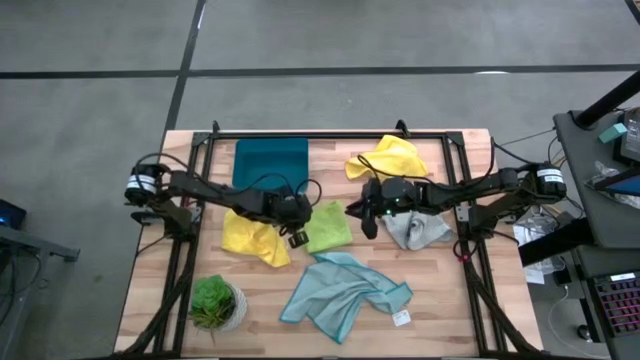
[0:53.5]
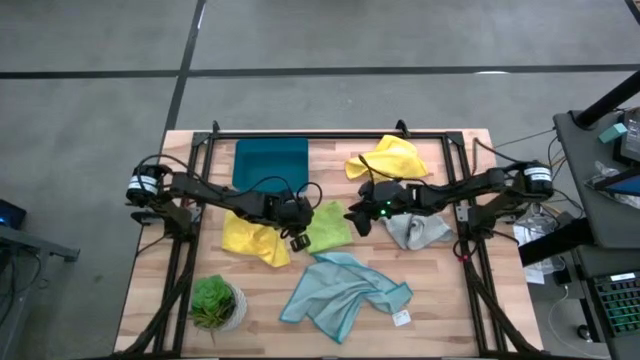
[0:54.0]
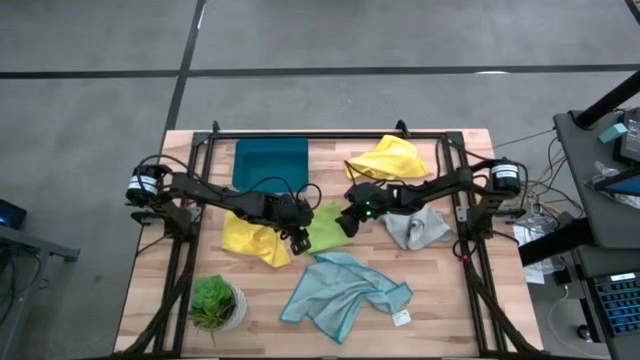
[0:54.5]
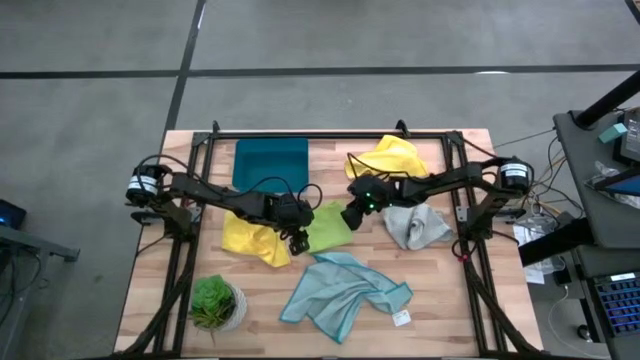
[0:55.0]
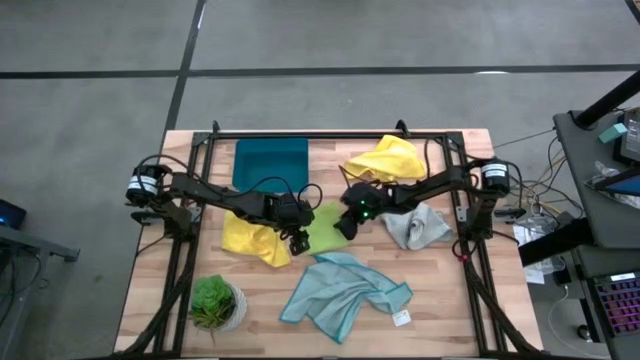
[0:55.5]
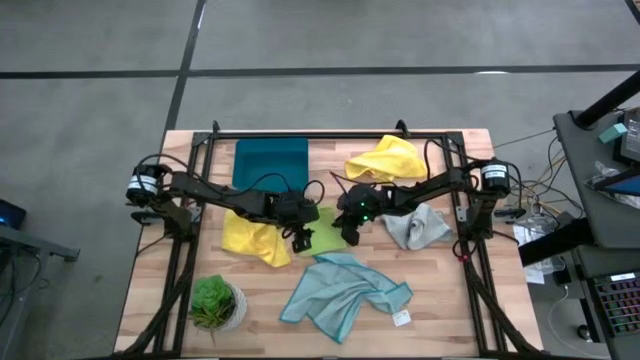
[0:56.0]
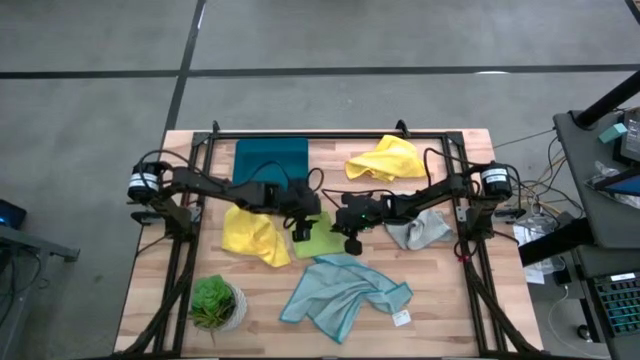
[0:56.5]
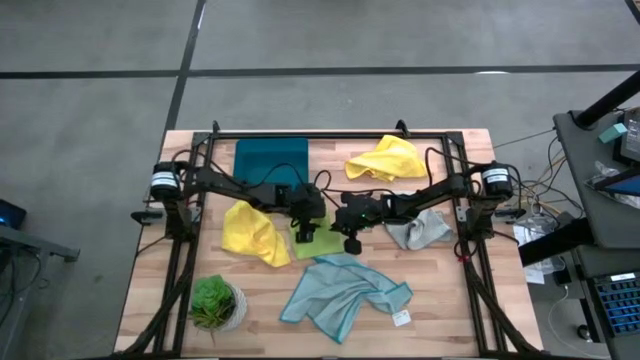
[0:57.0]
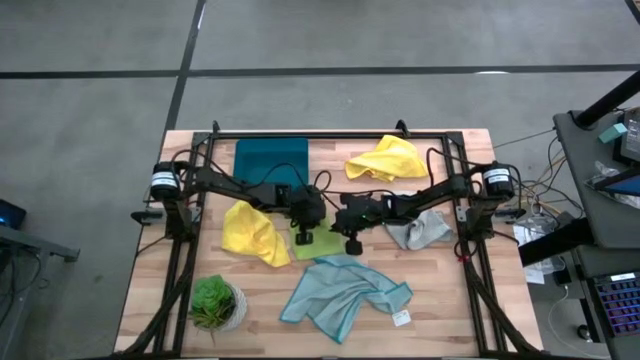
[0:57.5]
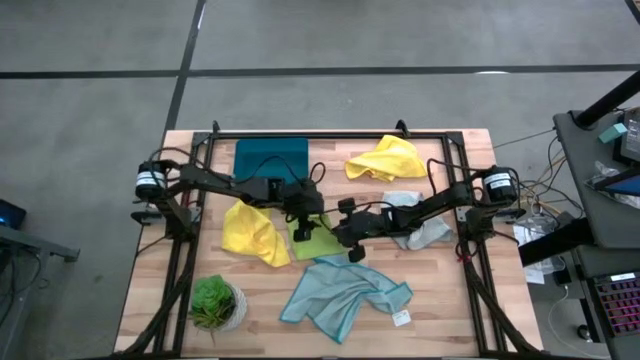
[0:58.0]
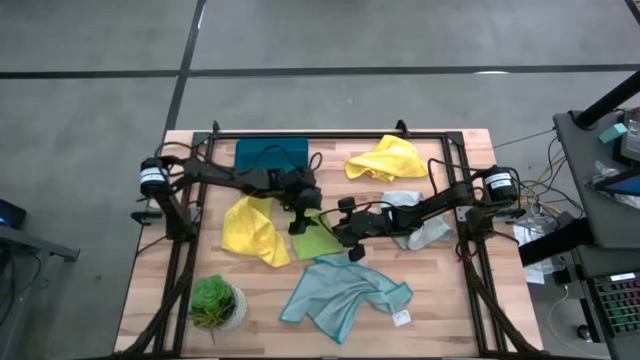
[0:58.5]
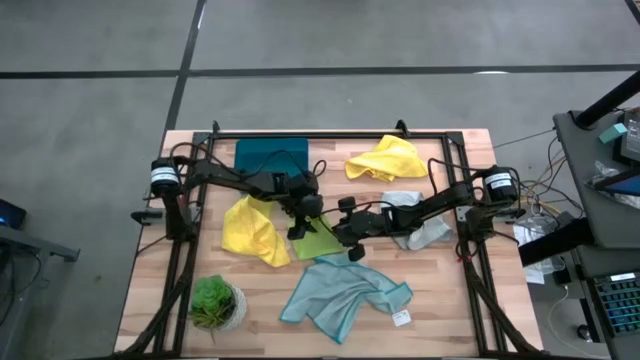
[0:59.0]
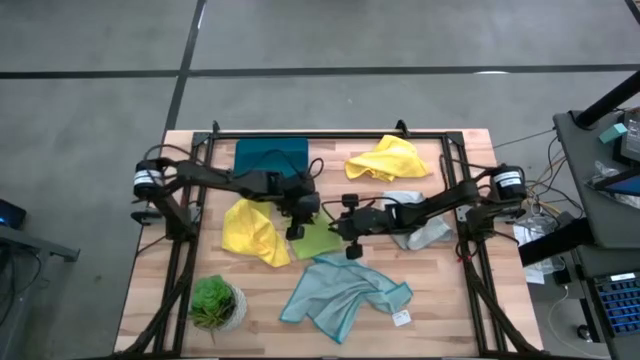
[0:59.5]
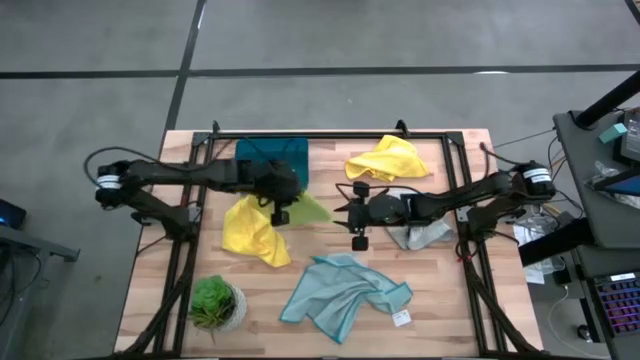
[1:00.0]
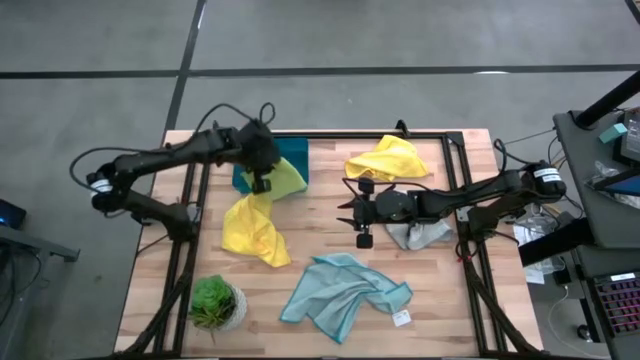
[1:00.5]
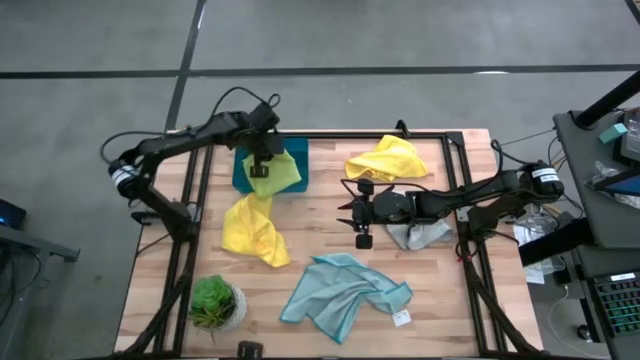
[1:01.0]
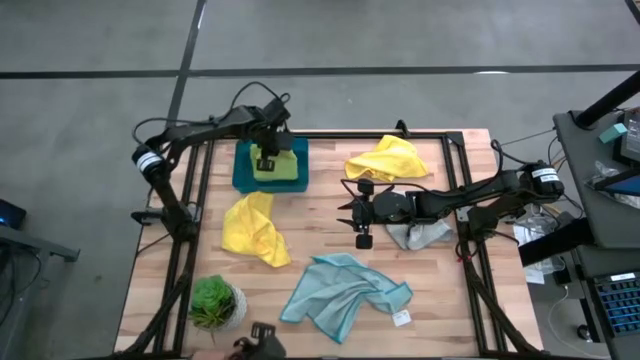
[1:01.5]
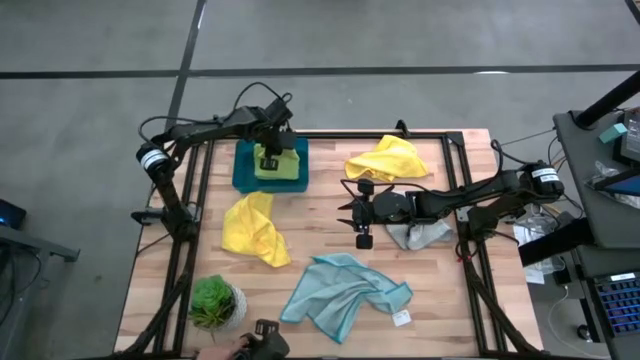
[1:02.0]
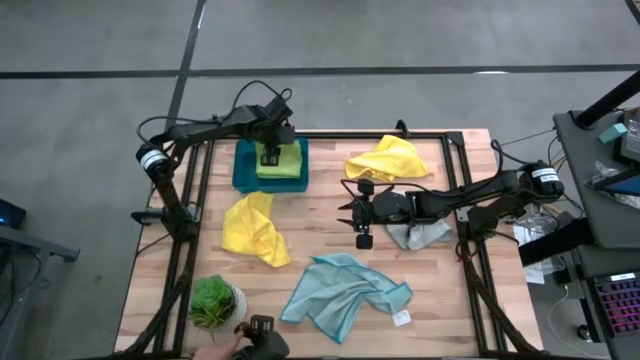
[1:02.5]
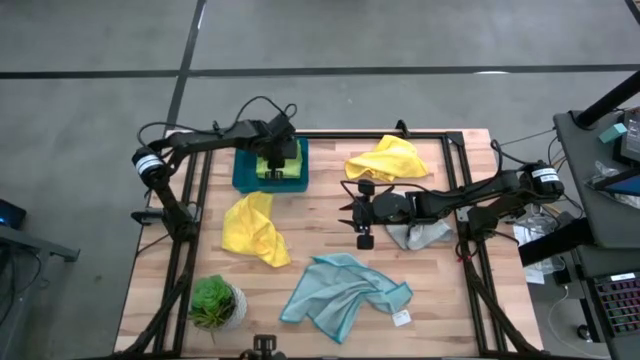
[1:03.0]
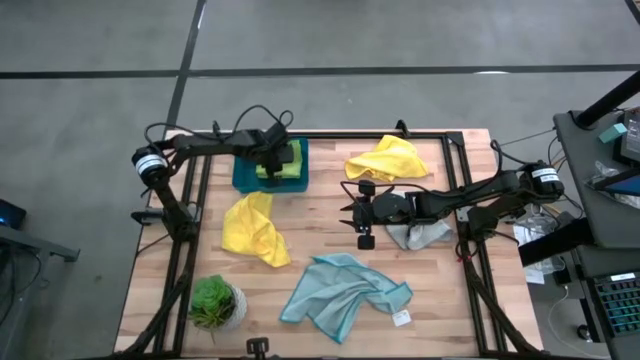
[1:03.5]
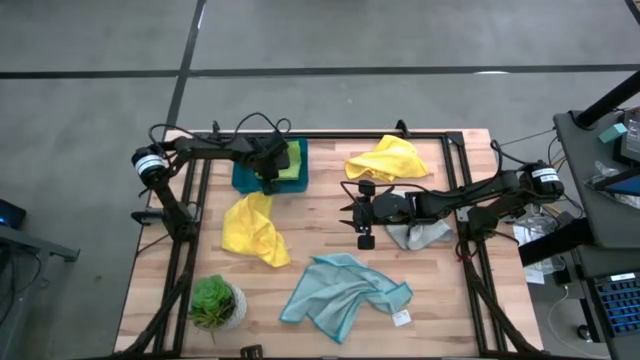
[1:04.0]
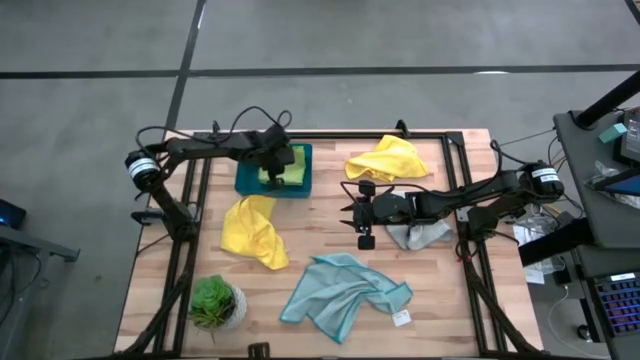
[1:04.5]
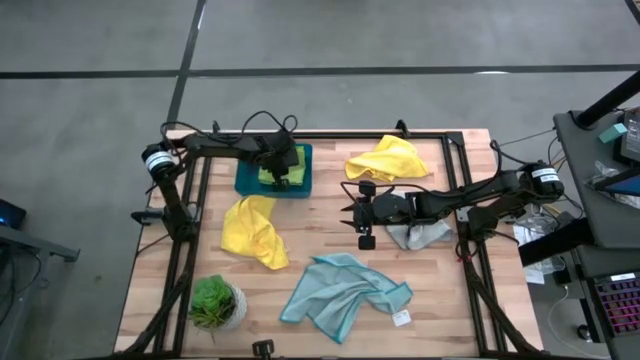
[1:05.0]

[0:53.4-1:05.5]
Task: Fold microfiber towels
Put the green microfiber towel into the blue bin

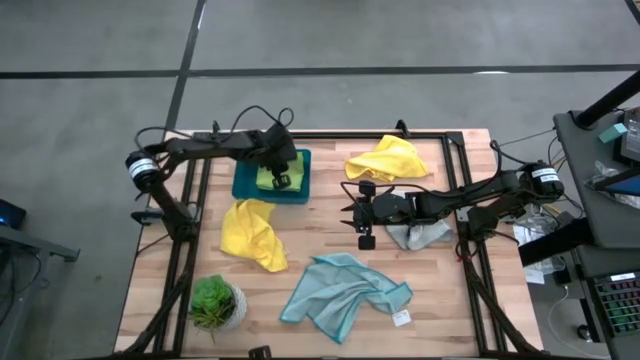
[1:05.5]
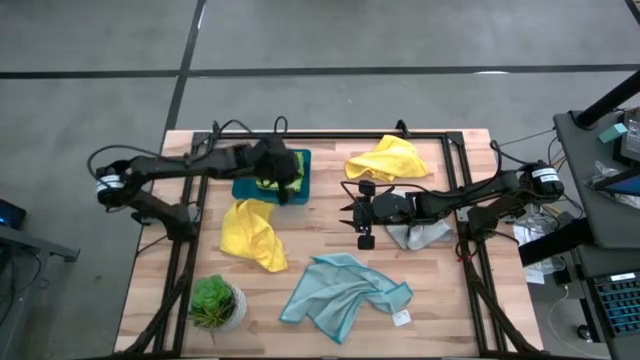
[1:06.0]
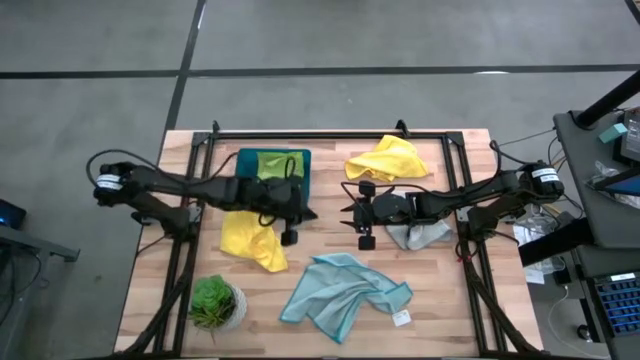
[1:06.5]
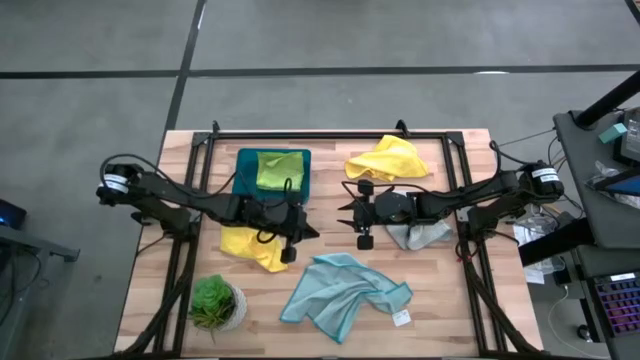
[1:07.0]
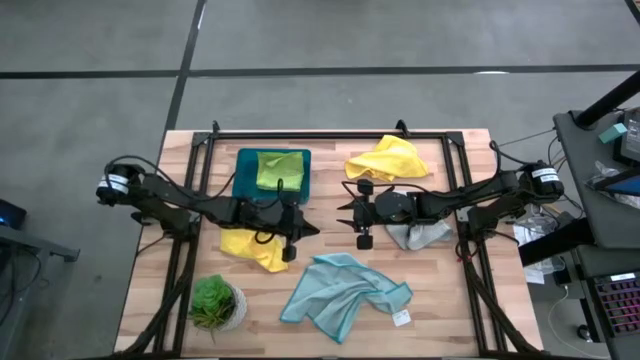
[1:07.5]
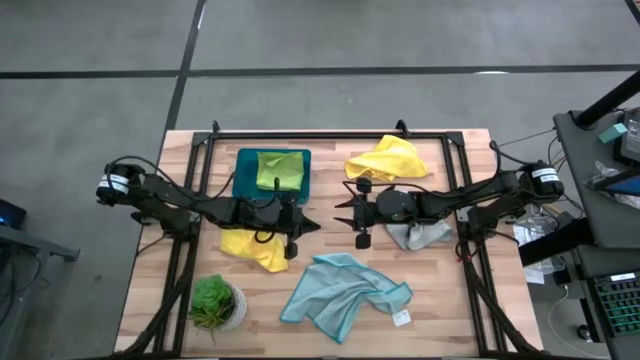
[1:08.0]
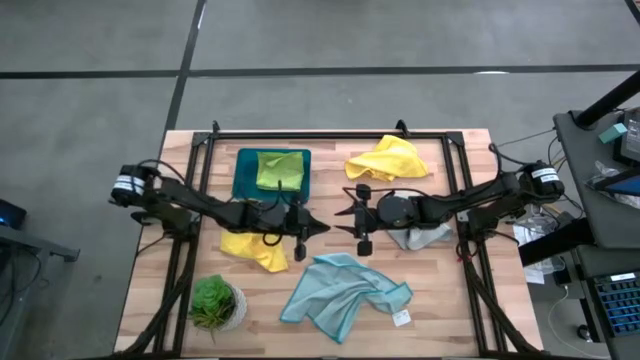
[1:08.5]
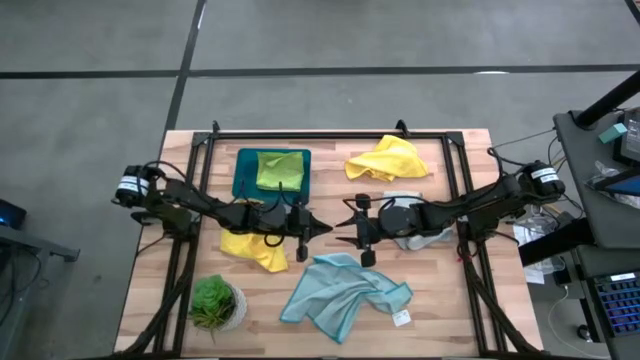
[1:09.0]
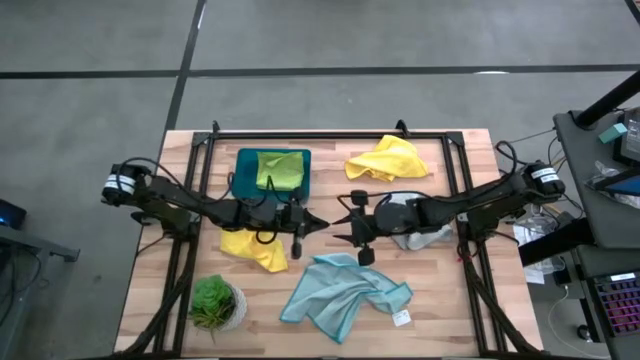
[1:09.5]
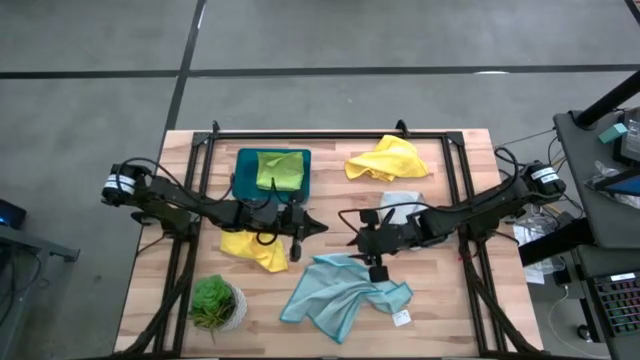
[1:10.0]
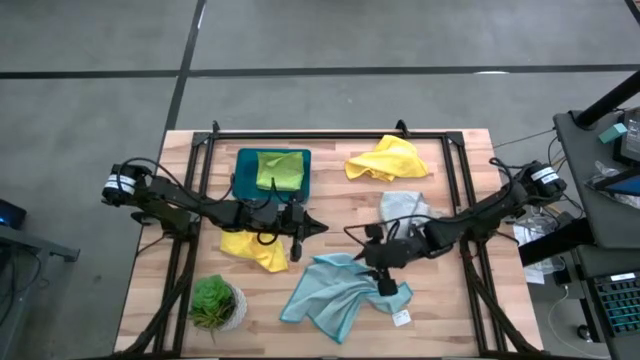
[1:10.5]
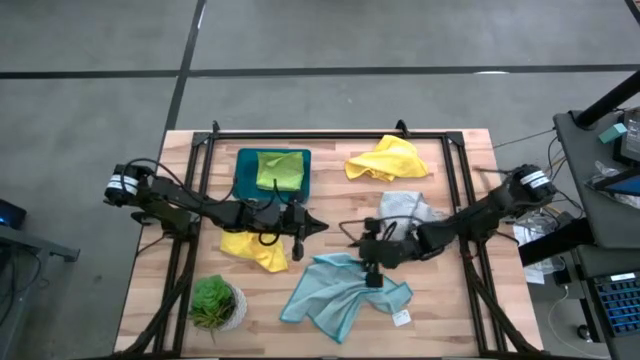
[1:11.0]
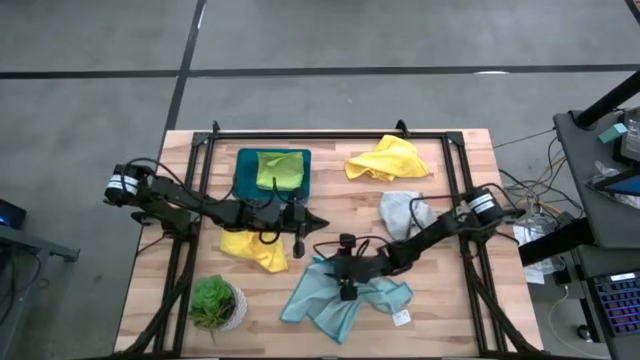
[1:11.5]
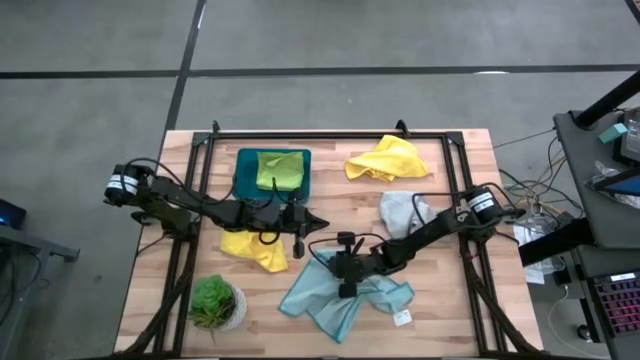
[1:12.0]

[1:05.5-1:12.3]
Fold the blue microfiber towel
